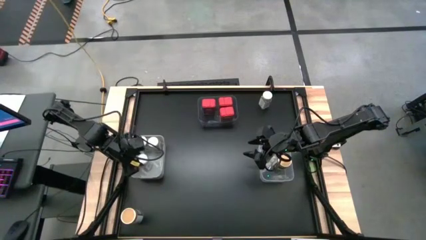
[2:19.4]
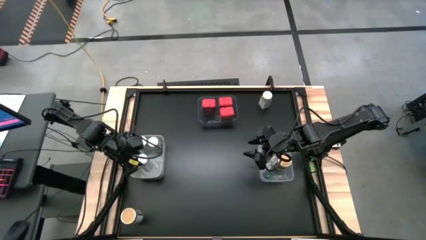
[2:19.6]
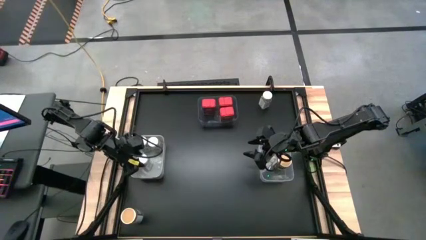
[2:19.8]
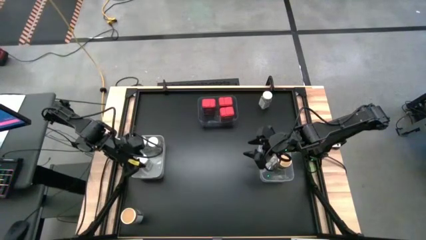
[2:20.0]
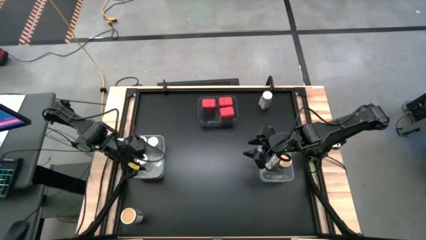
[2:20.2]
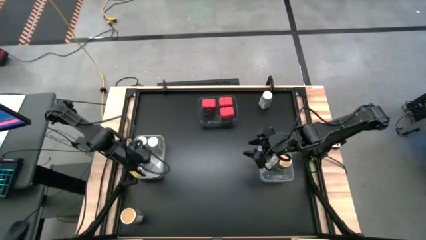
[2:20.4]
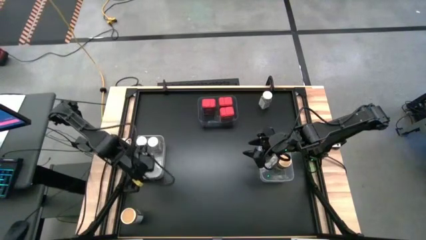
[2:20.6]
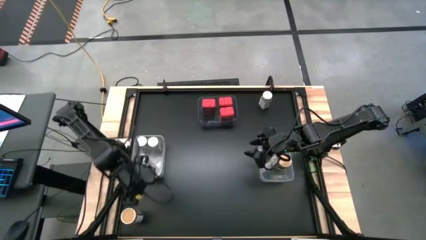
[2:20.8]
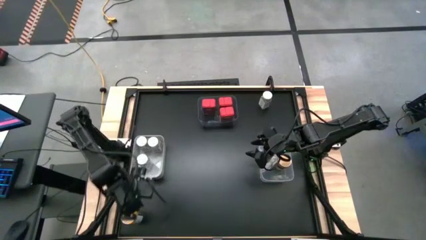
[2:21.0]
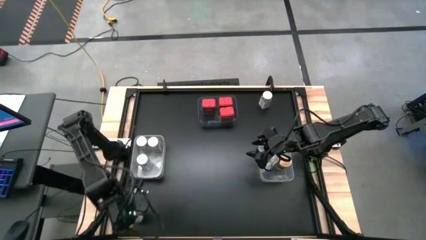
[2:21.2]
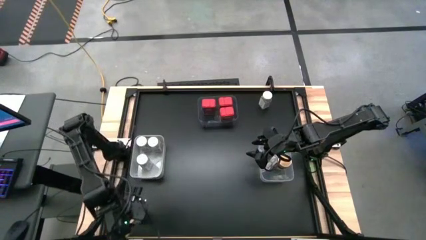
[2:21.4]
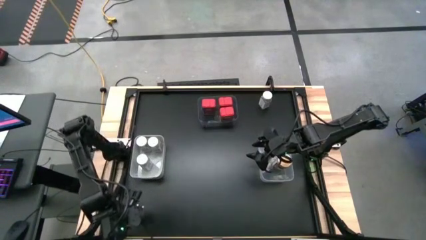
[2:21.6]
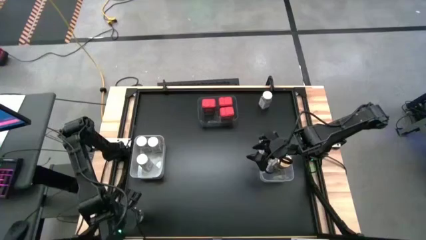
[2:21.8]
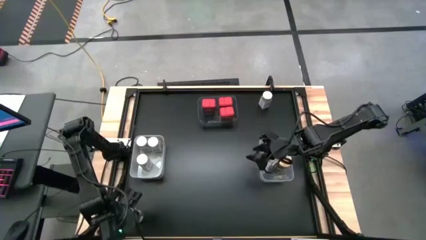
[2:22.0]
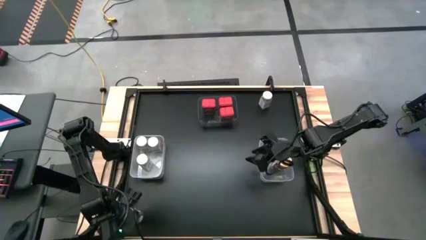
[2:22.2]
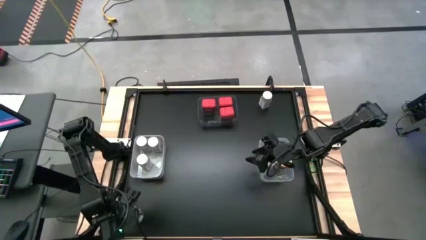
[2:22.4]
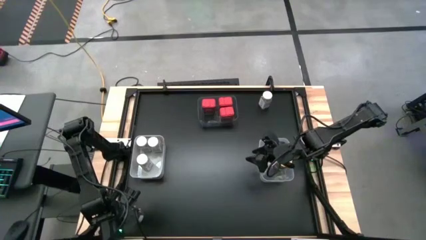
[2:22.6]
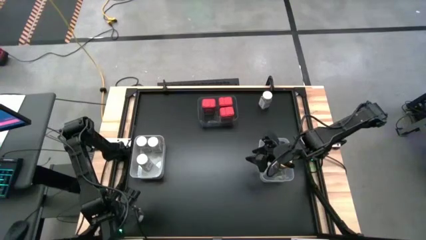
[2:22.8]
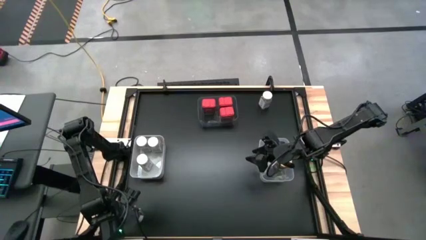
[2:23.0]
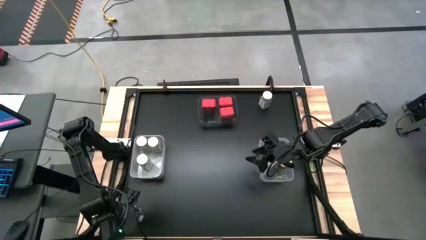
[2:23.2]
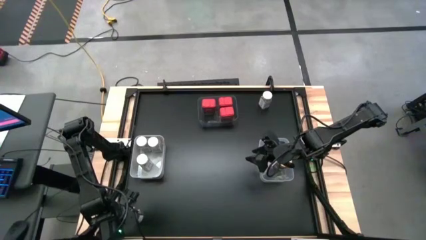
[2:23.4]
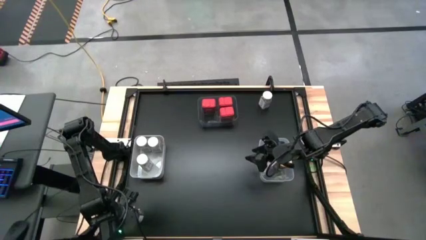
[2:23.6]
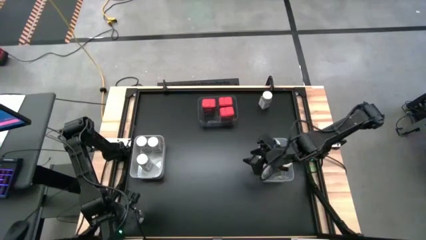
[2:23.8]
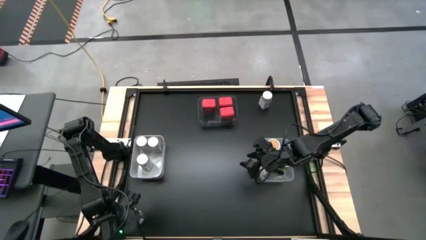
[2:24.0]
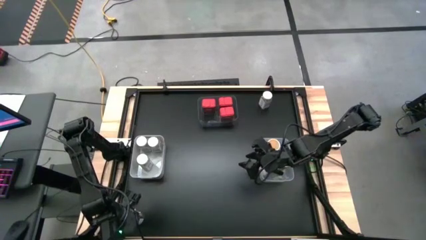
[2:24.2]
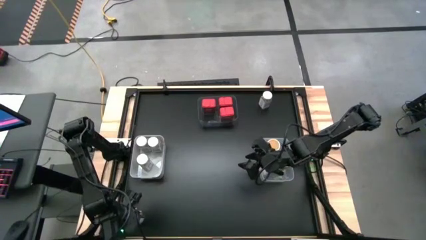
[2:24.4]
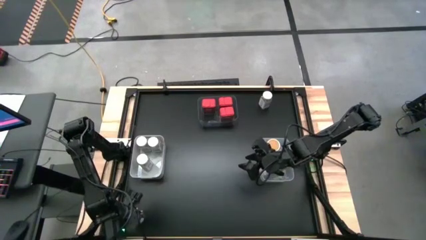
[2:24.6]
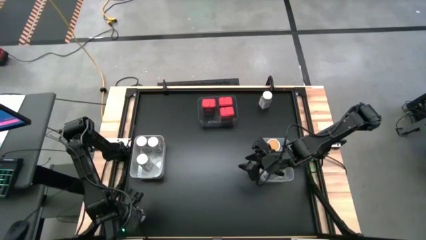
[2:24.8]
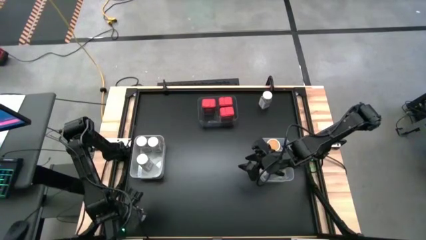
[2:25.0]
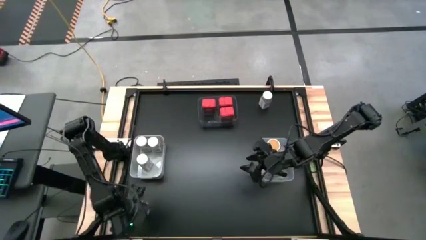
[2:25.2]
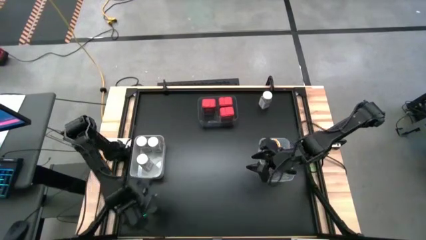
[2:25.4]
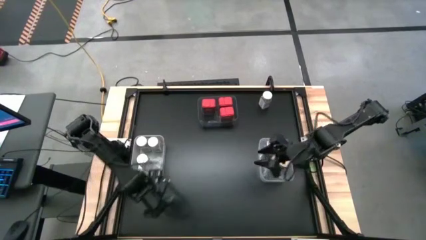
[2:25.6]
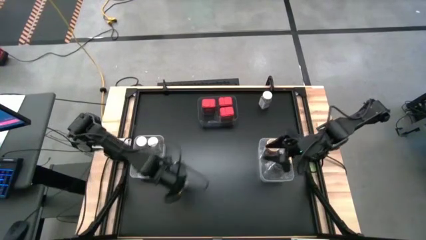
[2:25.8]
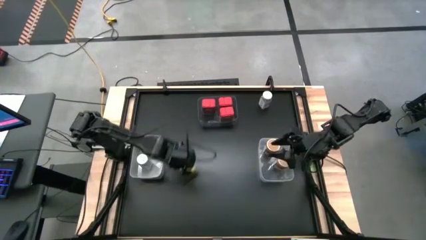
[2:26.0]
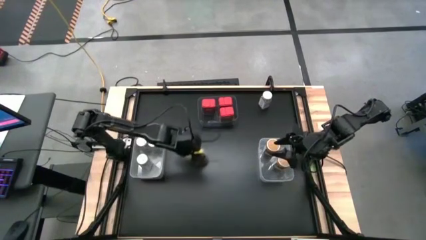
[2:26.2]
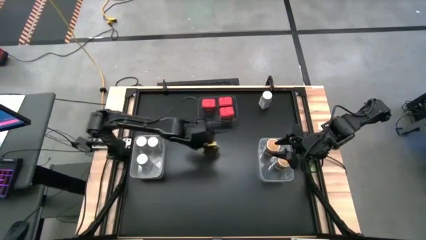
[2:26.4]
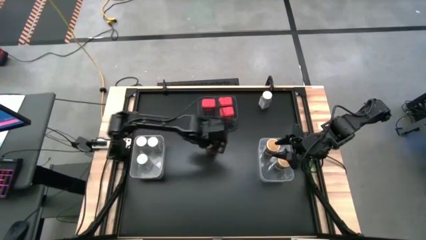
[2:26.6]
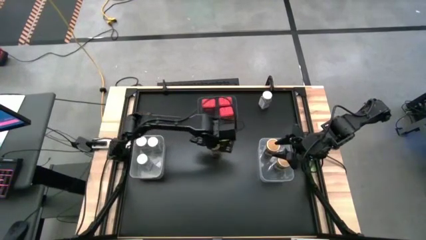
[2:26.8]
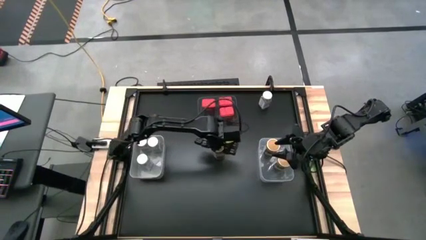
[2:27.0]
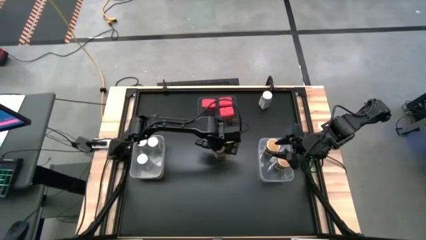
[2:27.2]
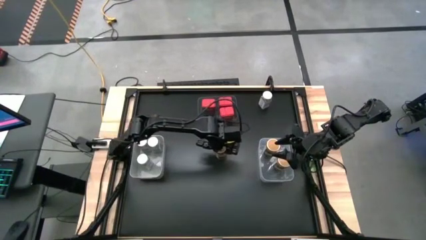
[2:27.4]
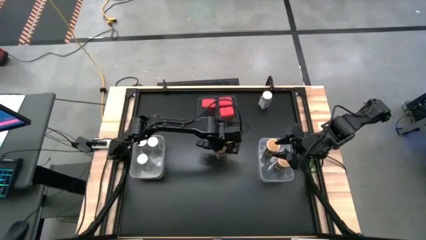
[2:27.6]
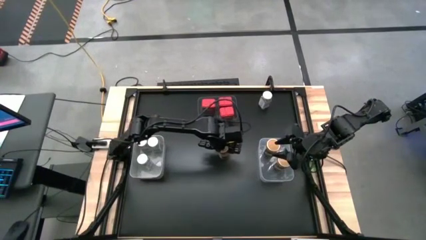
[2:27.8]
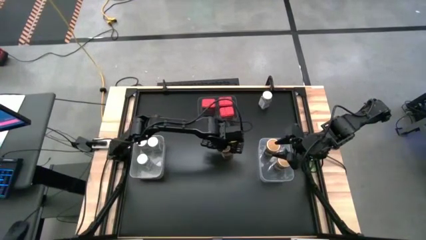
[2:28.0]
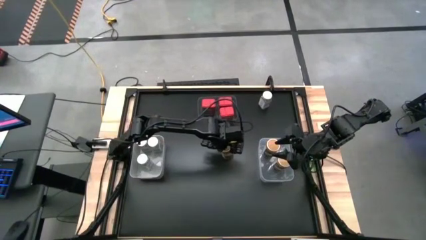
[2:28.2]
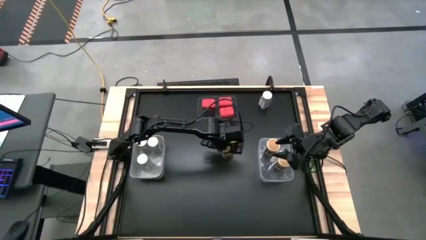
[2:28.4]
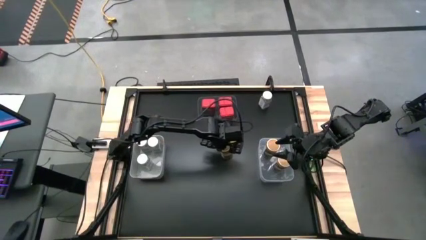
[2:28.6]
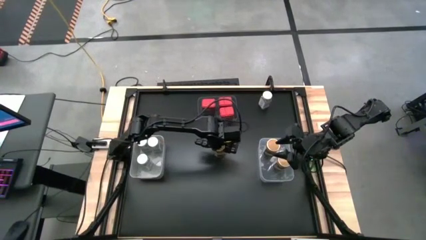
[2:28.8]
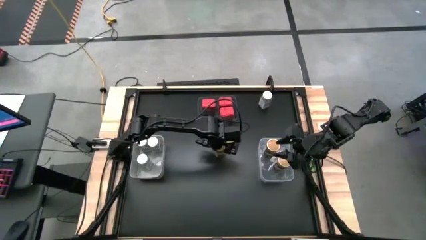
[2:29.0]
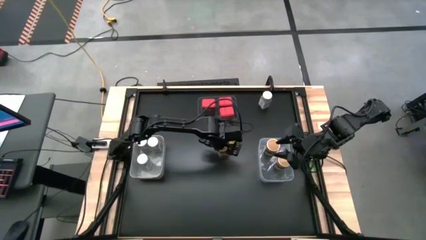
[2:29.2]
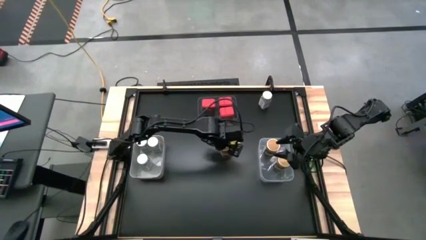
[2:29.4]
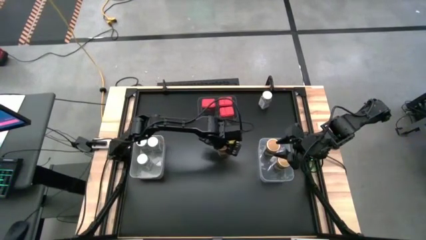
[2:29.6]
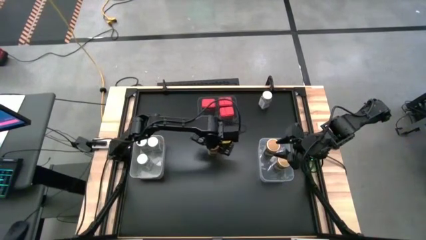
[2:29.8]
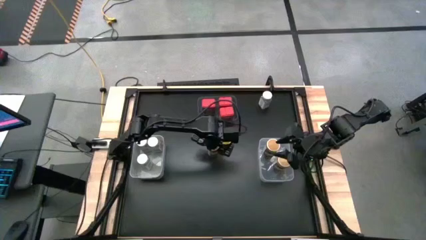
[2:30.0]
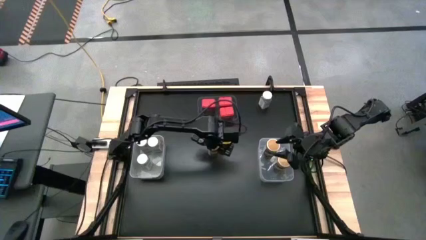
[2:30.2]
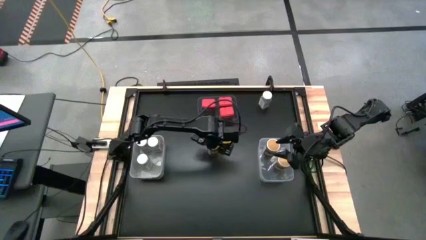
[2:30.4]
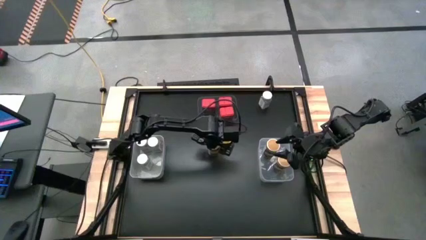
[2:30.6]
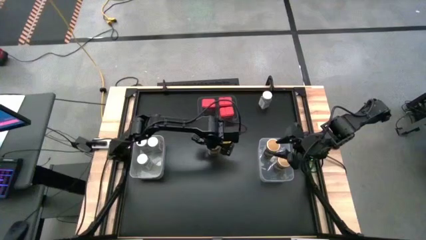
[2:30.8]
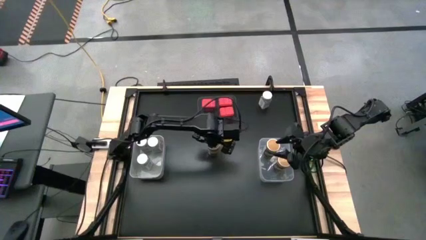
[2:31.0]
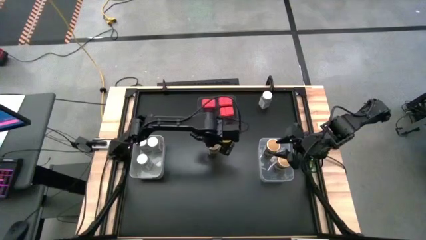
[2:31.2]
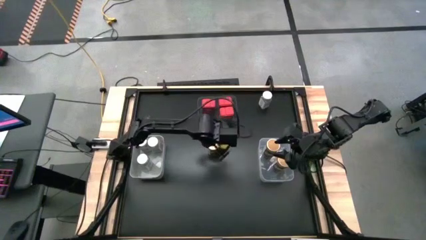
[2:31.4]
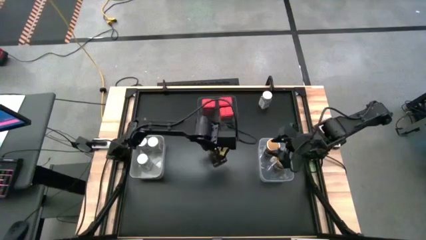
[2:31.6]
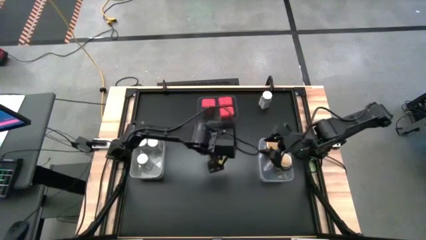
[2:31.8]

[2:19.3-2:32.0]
Task: Sort spices by type
Put the gold seasoning bottle into the transparent bin
